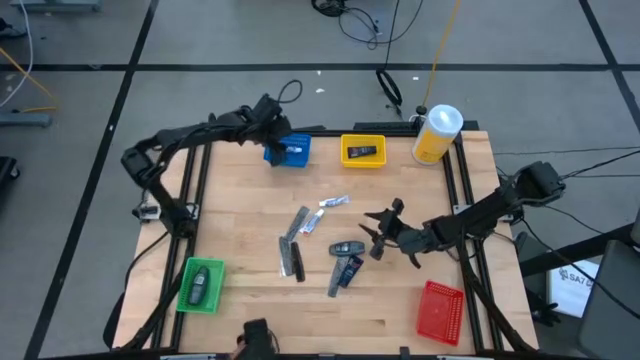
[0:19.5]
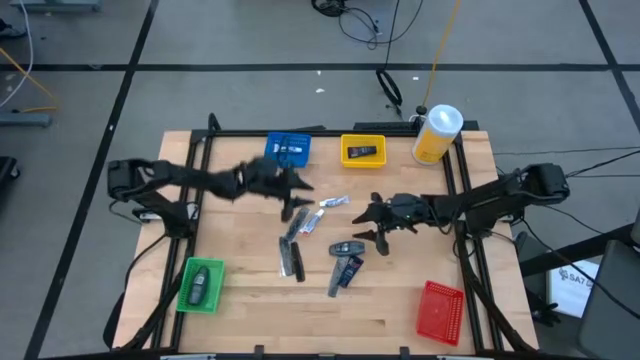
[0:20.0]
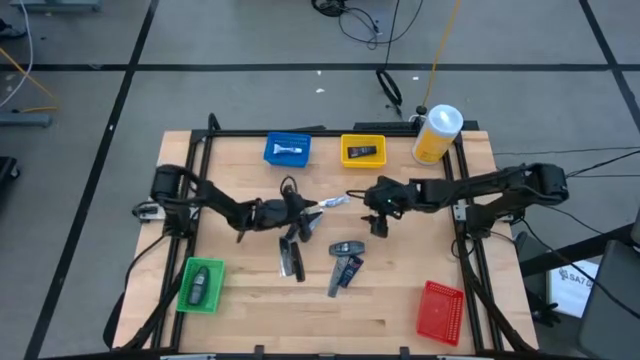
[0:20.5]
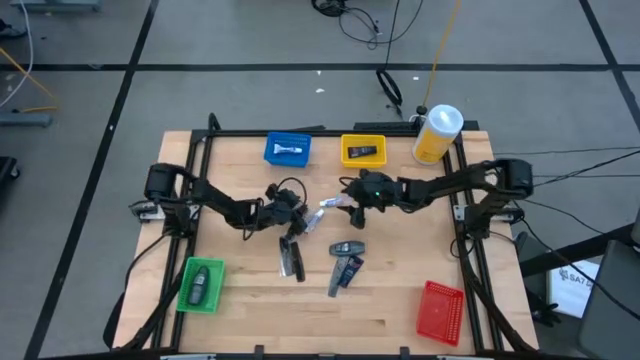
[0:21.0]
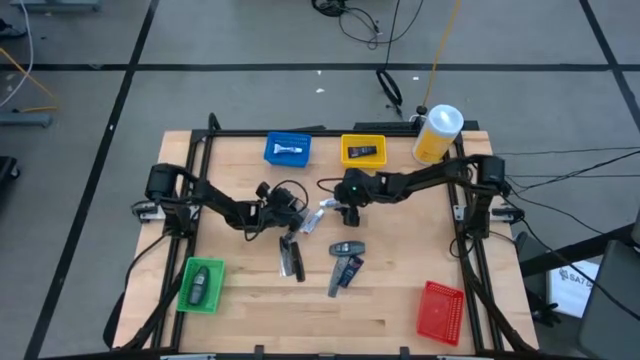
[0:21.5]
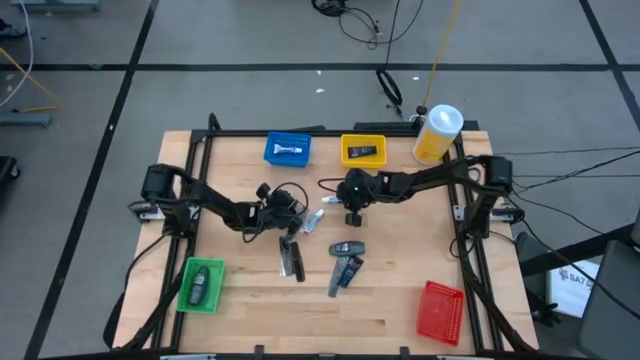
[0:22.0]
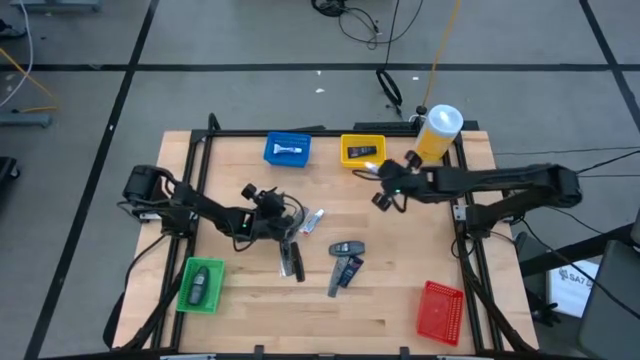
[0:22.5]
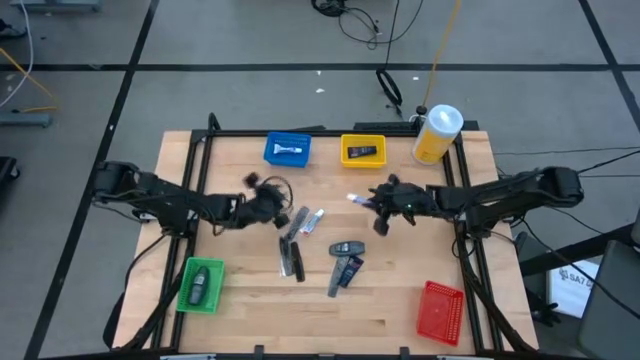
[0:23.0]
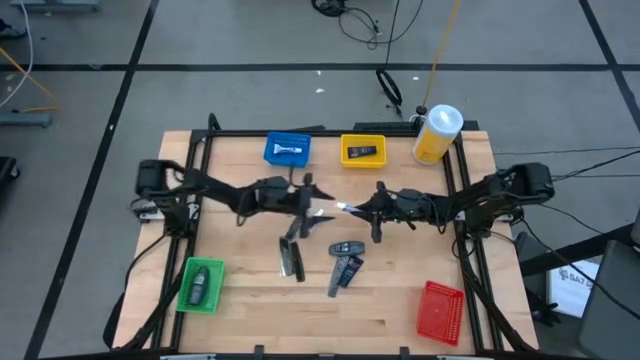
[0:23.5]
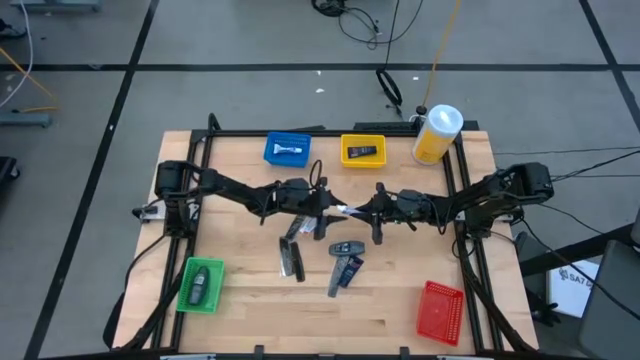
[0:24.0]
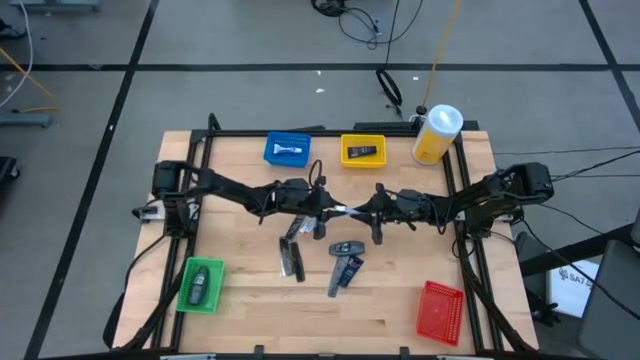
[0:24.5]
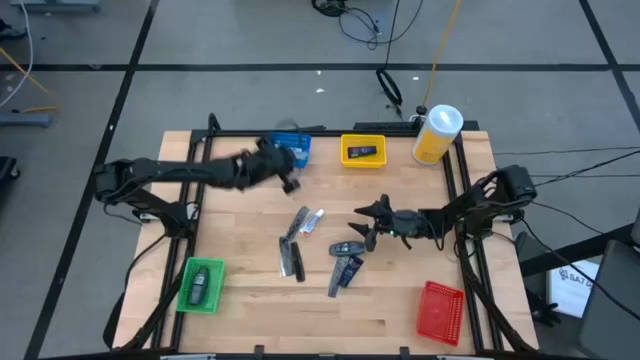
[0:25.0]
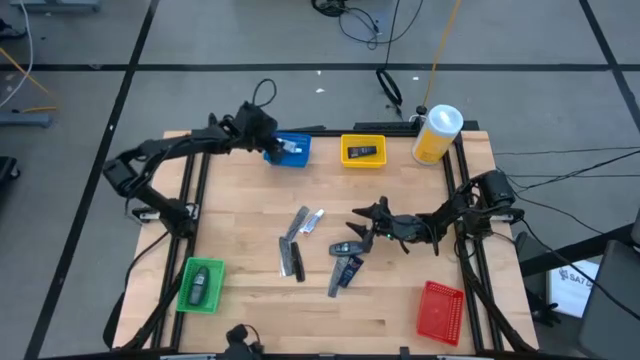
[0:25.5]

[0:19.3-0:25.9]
Task: Pick & Place Travel size toiletries
Put the white toothpaste into the blue bin

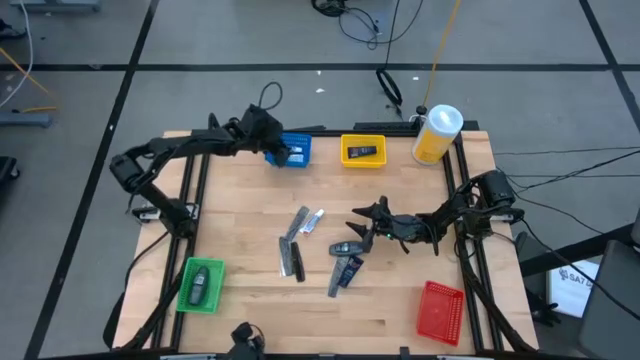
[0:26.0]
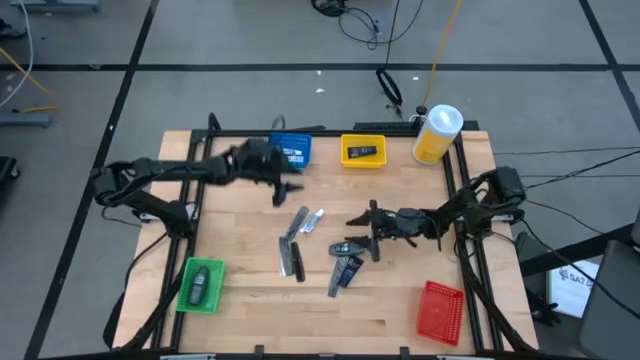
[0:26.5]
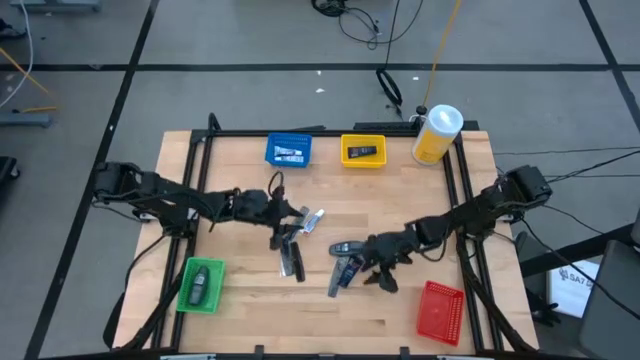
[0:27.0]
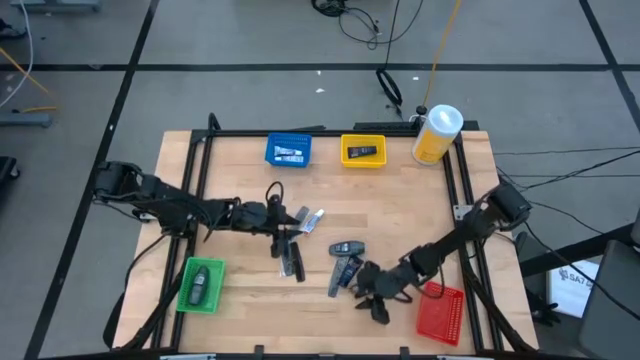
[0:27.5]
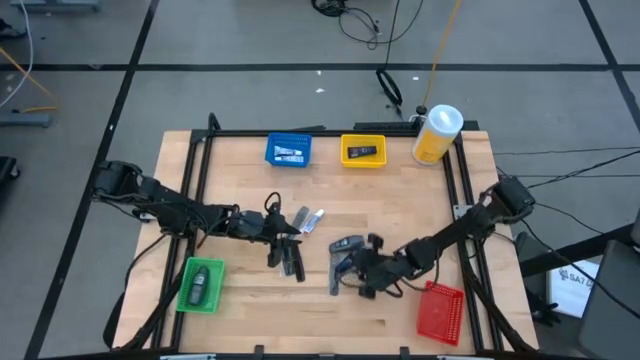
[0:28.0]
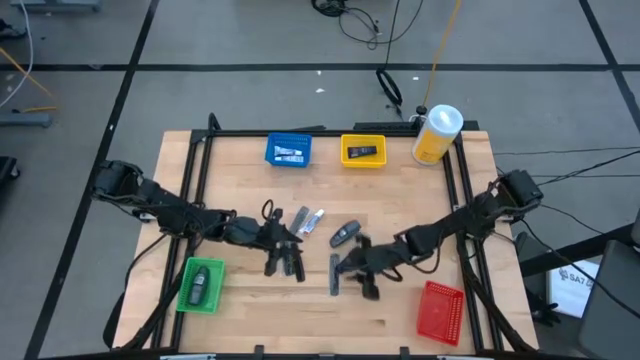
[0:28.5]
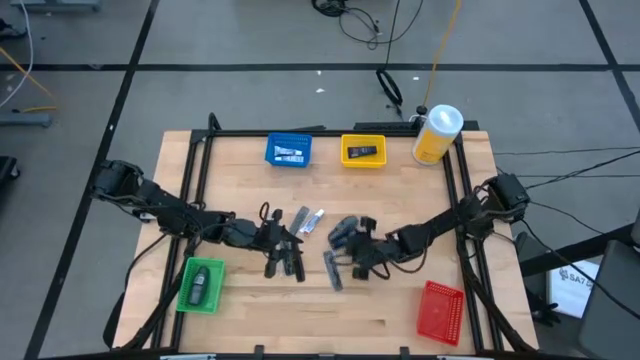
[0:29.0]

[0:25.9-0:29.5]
Adjust the blue shave cream

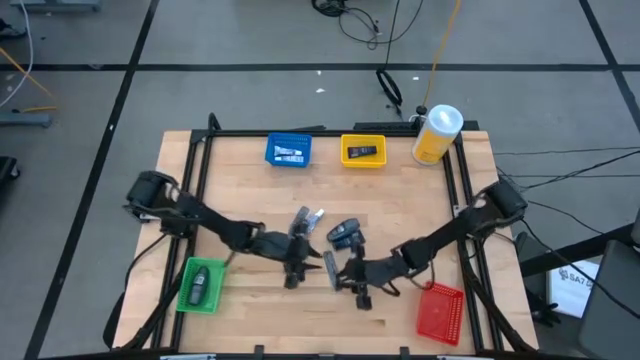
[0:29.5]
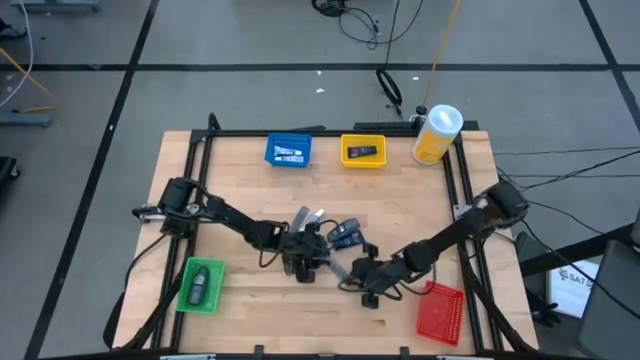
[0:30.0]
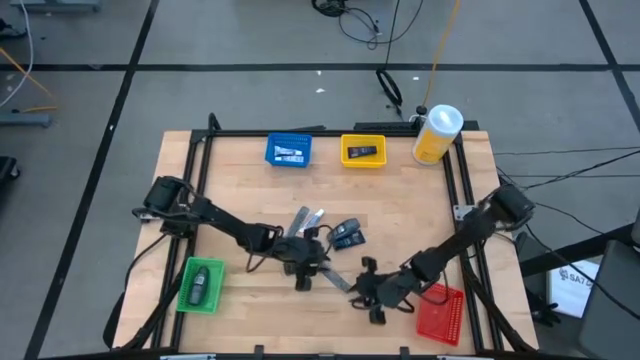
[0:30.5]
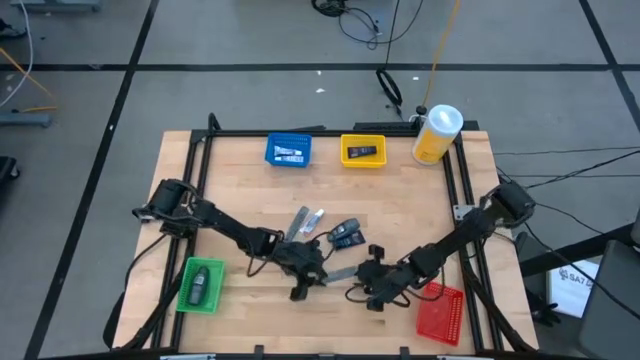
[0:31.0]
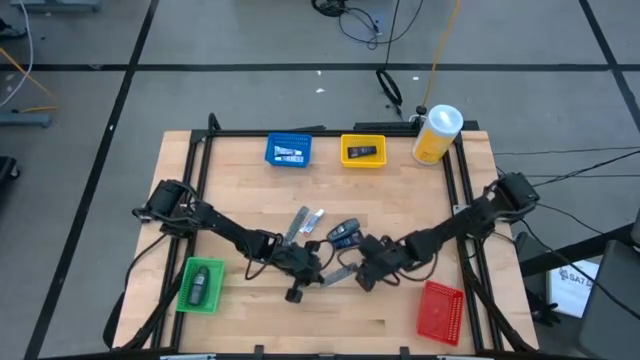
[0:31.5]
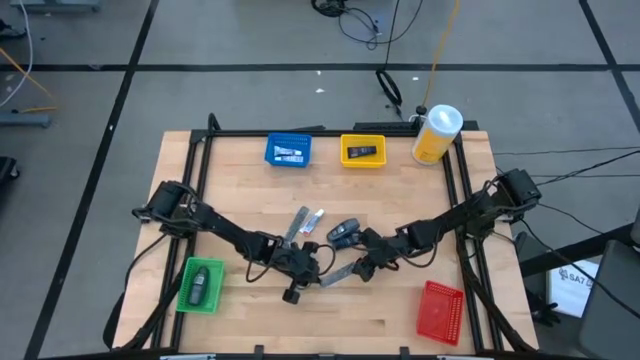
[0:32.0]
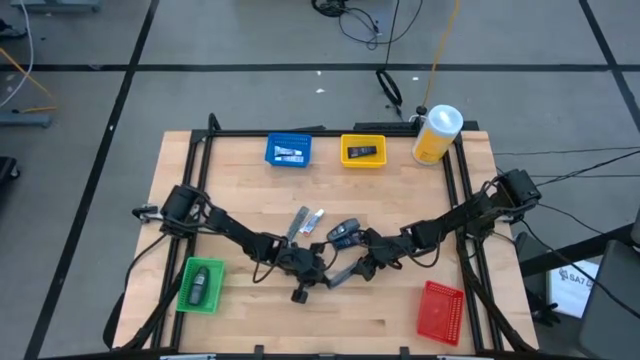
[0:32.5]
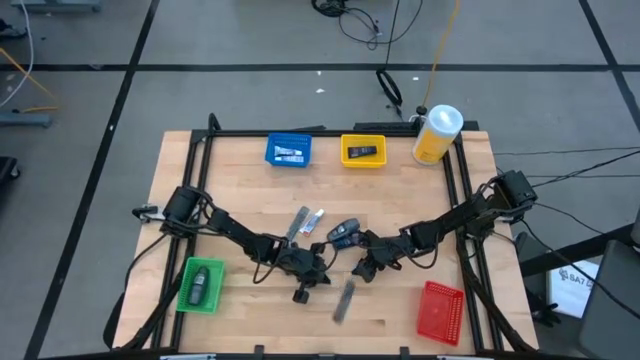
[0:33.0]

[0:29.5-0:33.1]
Put the black hair comb into the red bin

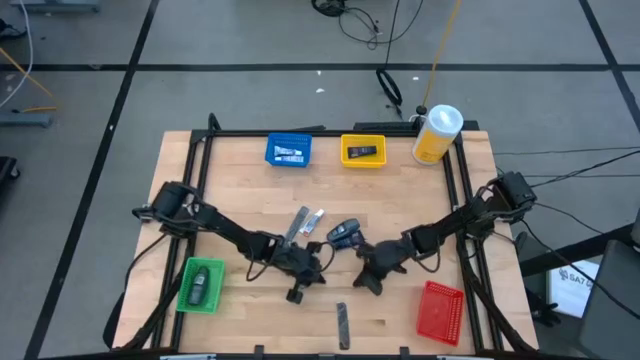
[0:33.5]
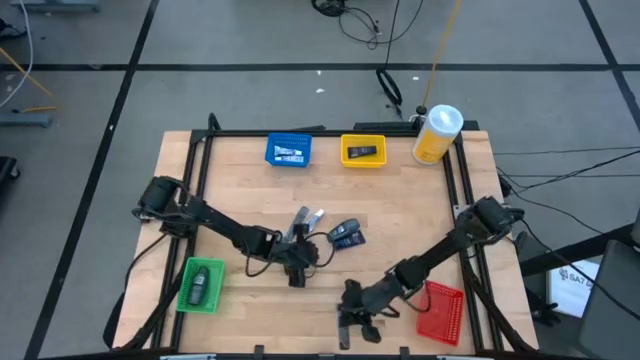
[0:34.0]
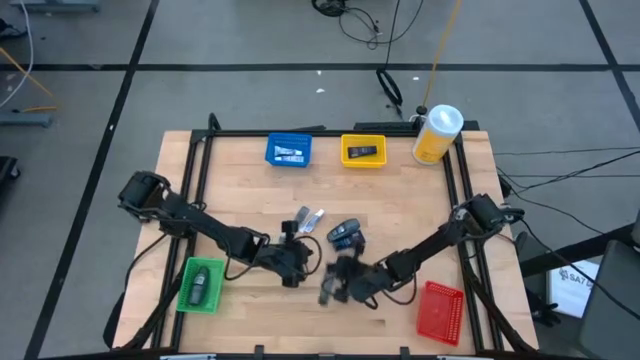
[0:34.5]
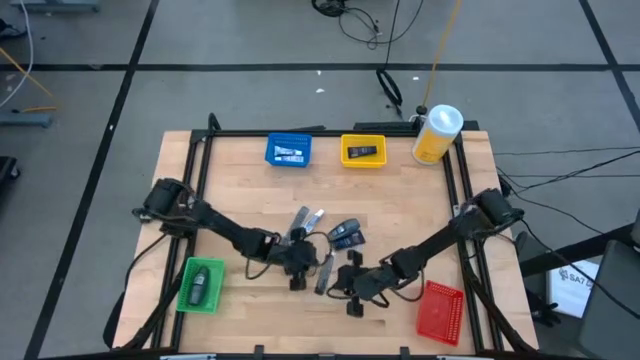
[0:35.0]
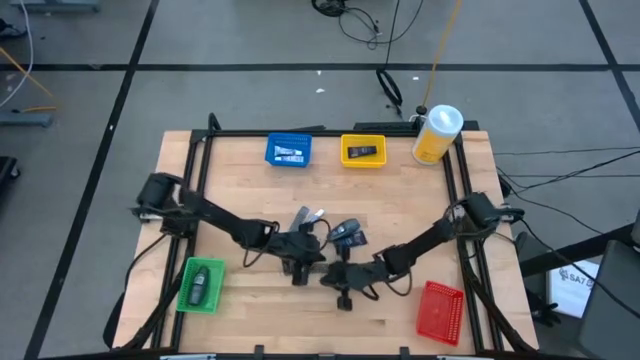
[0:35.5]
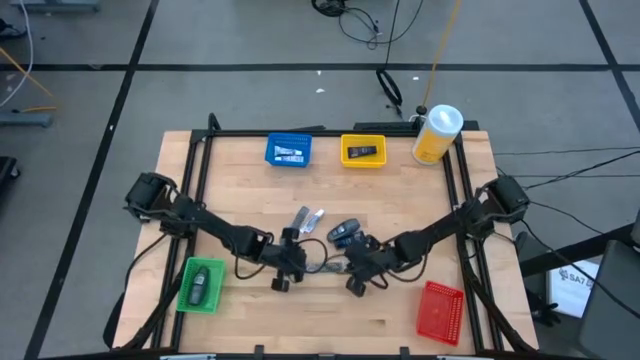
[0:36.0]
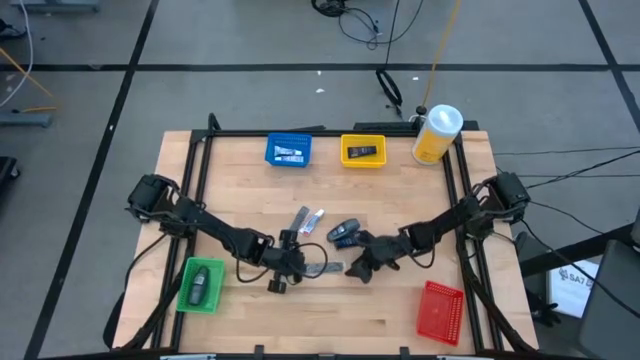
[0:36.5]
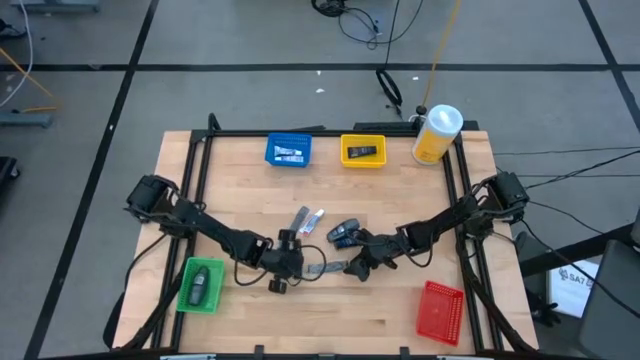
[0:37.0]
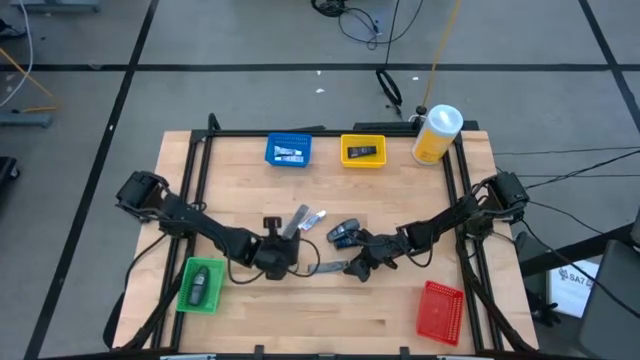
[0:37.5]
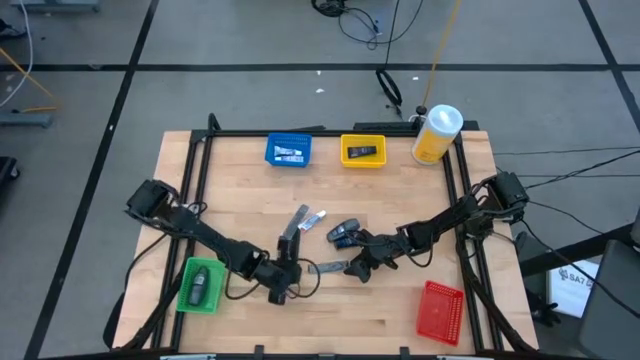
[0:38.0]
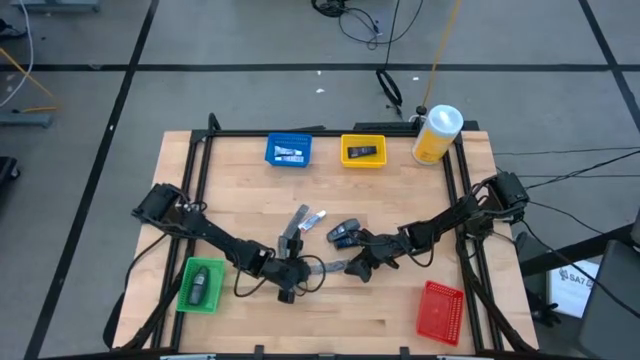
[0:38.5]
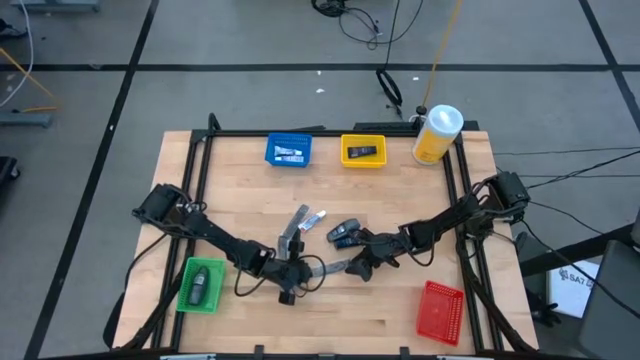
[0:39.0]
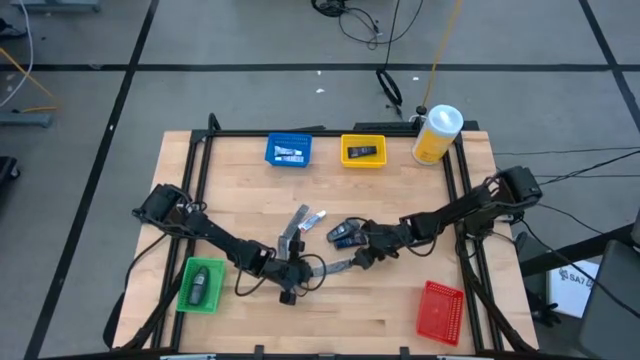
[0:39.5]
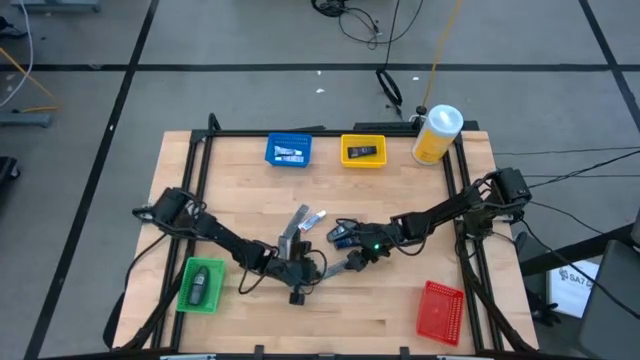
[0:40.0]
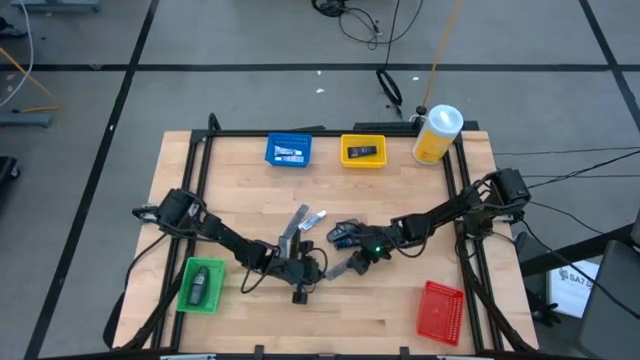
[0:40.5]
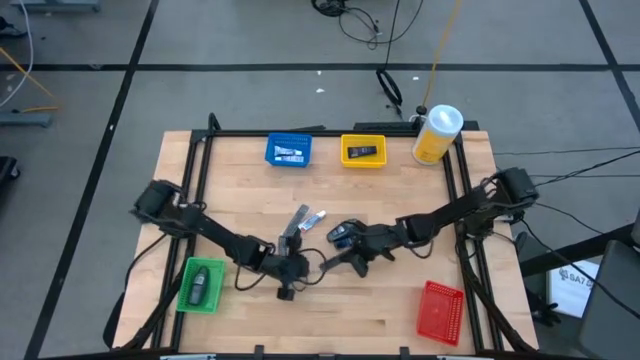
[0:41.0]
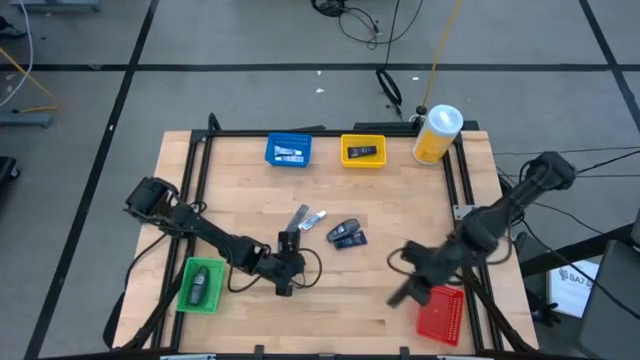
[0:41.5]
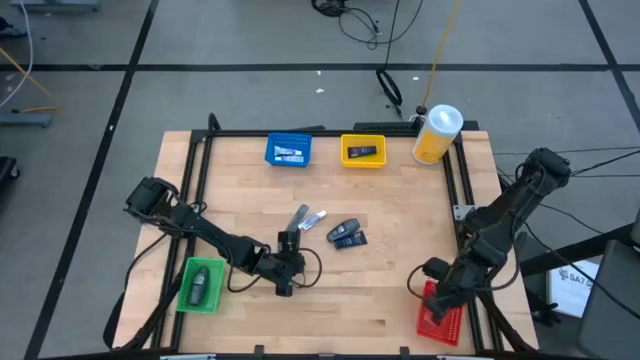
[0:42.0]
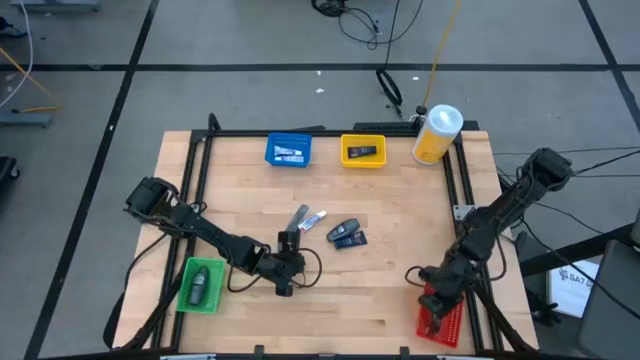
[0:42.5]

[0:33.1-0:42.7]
Put the black hair comb into the red bin

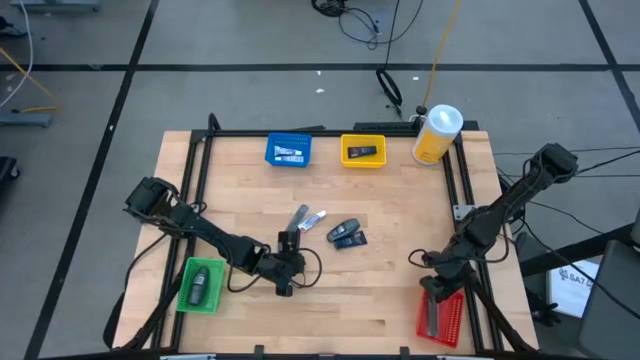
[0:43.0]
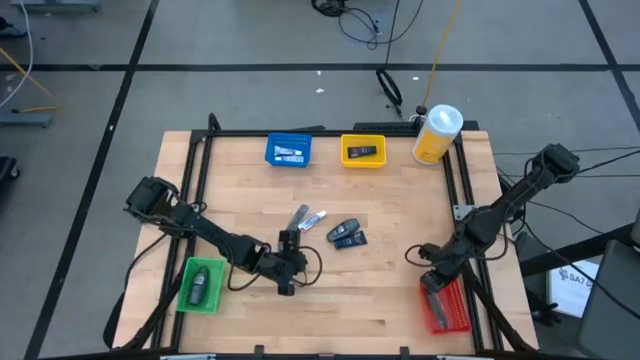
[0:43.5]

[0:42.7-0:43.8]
Adjust the red bin
